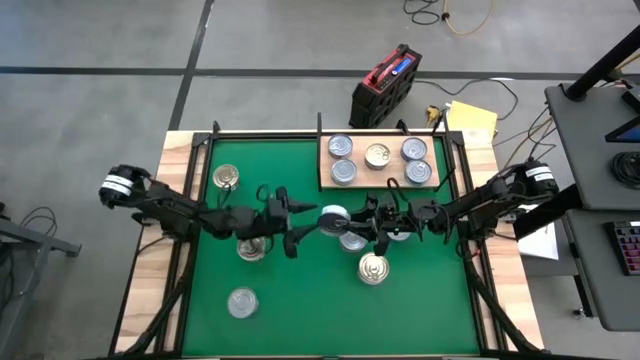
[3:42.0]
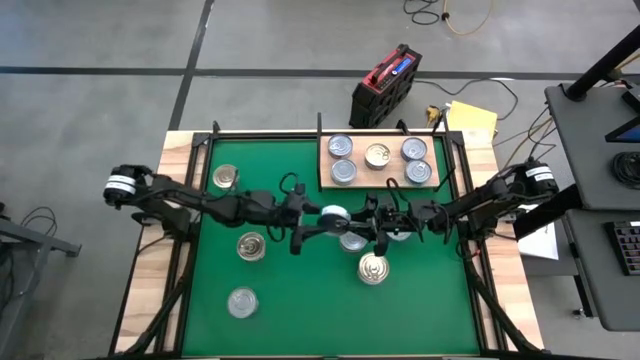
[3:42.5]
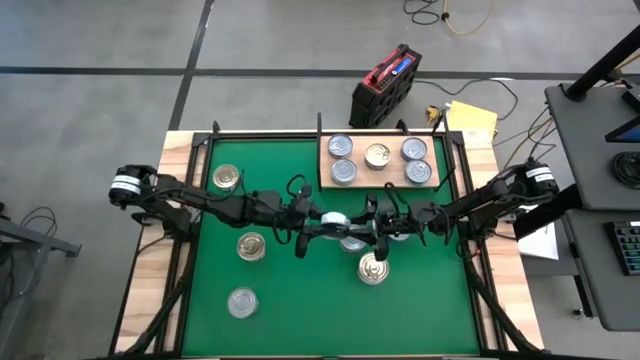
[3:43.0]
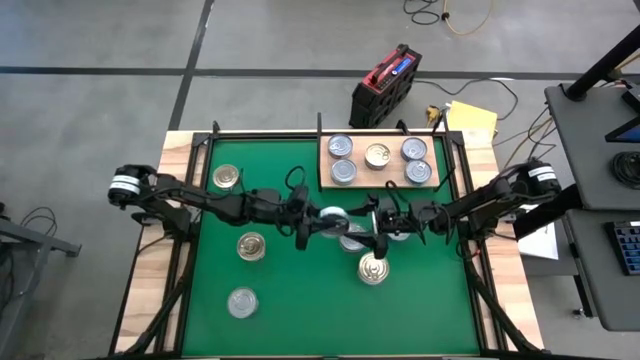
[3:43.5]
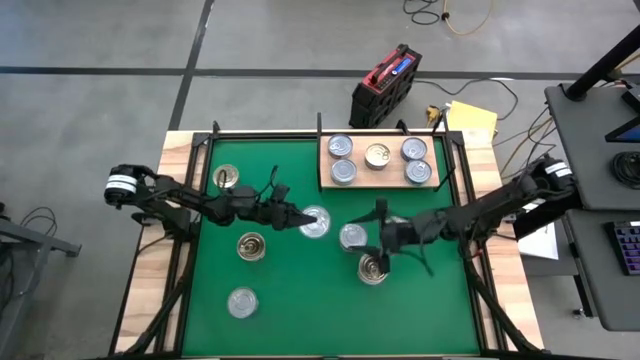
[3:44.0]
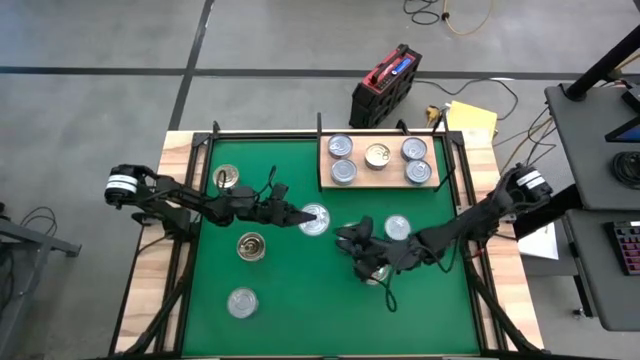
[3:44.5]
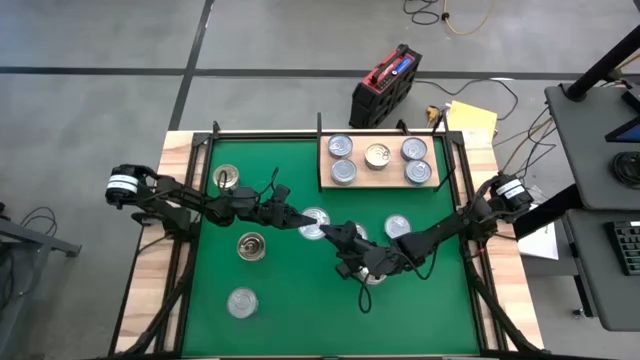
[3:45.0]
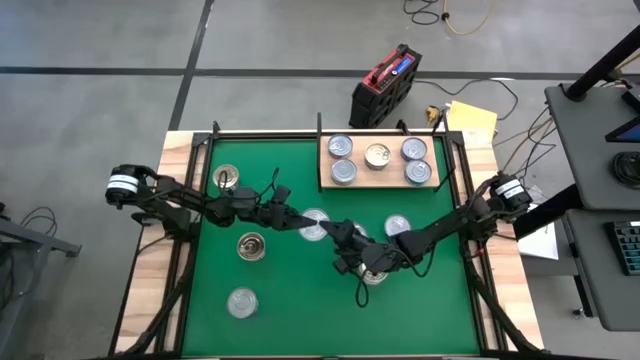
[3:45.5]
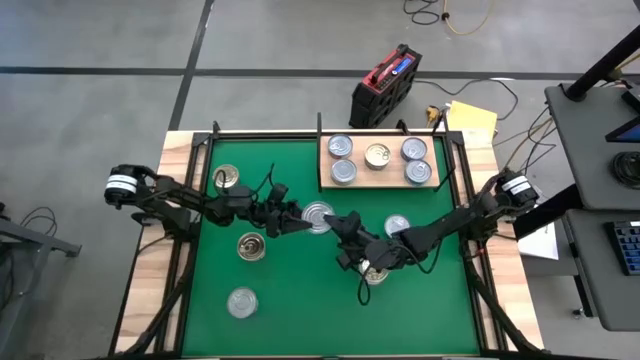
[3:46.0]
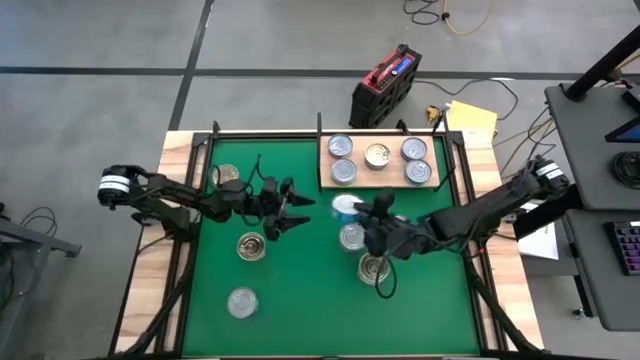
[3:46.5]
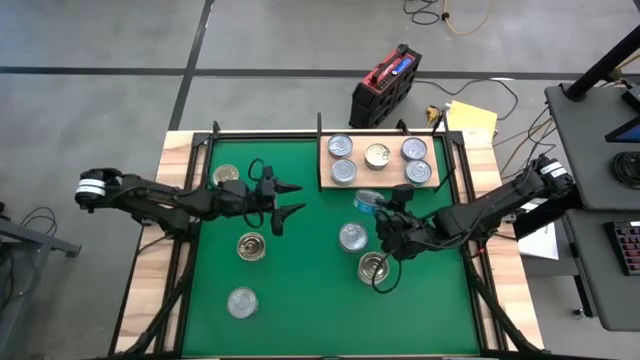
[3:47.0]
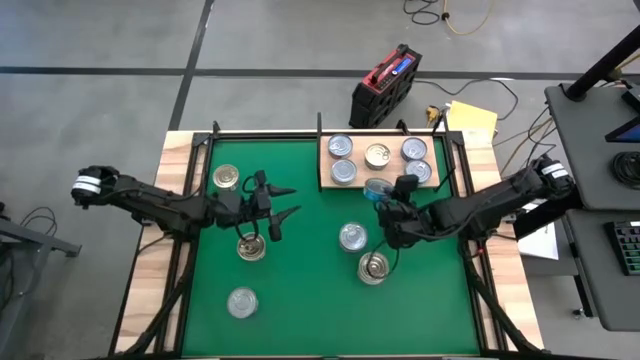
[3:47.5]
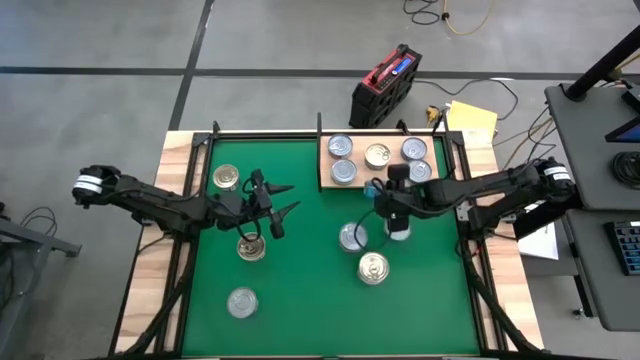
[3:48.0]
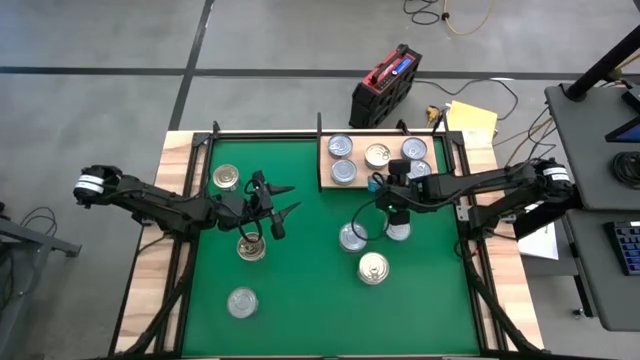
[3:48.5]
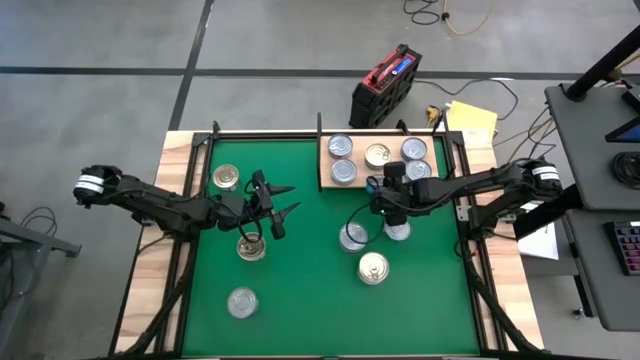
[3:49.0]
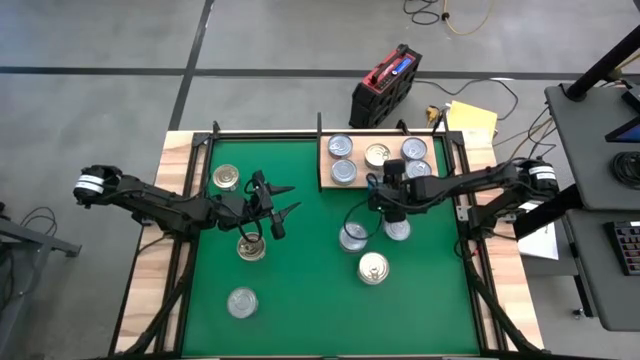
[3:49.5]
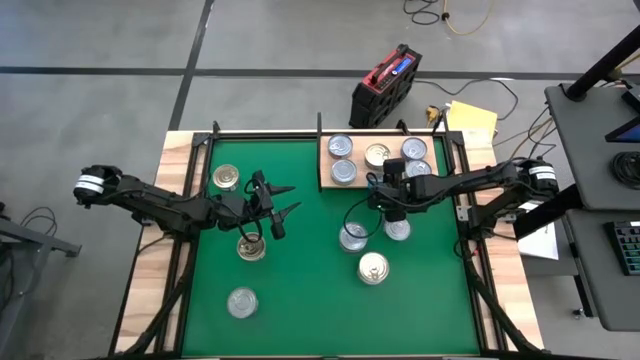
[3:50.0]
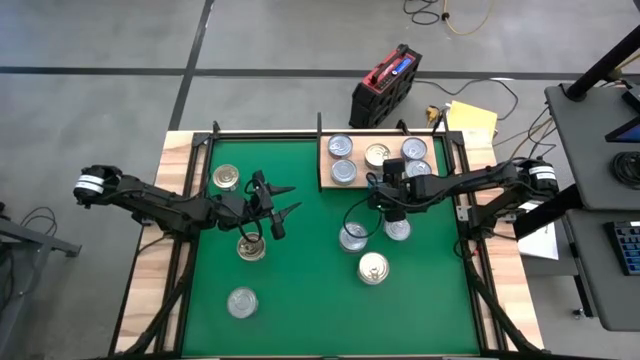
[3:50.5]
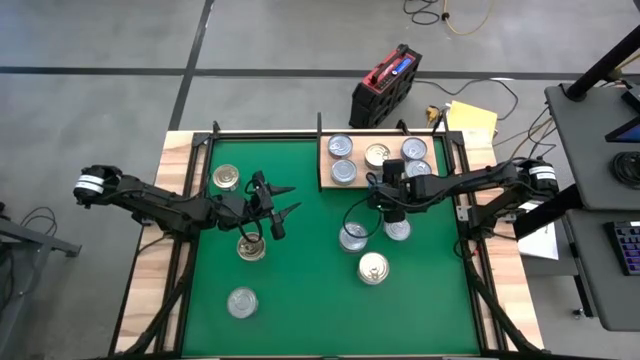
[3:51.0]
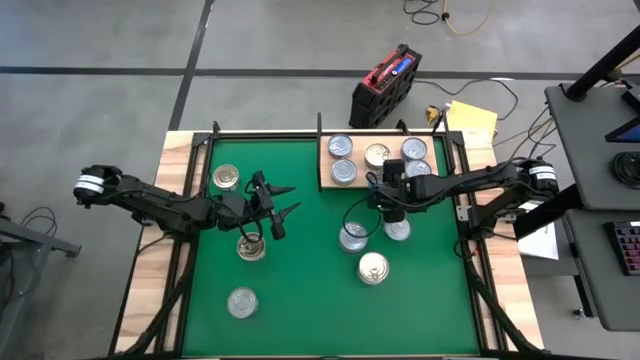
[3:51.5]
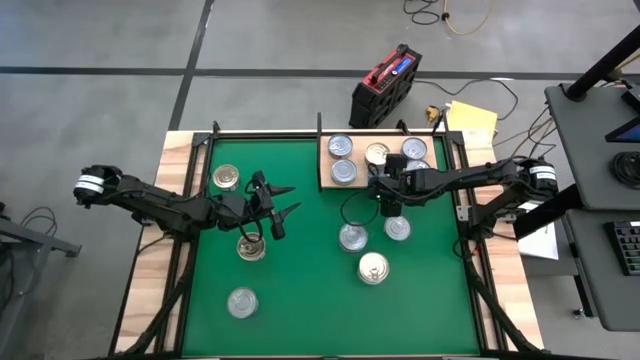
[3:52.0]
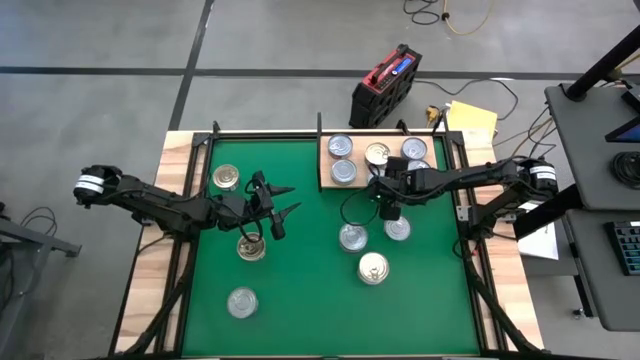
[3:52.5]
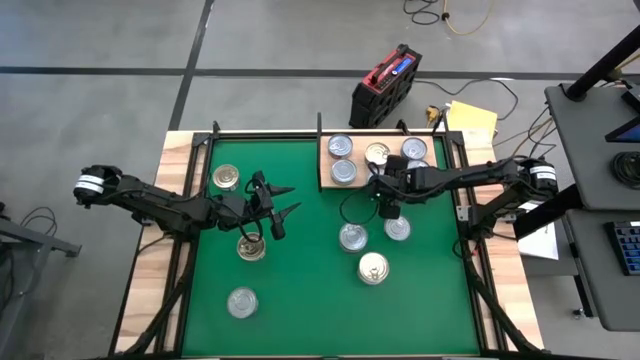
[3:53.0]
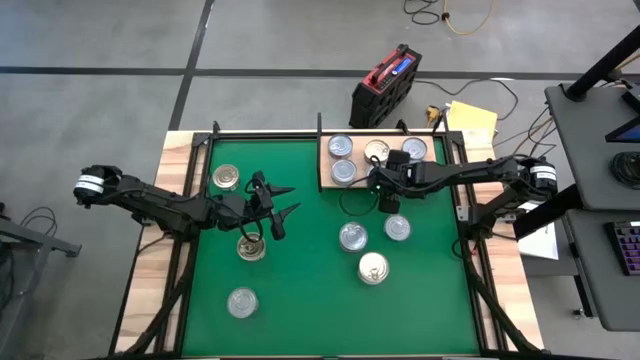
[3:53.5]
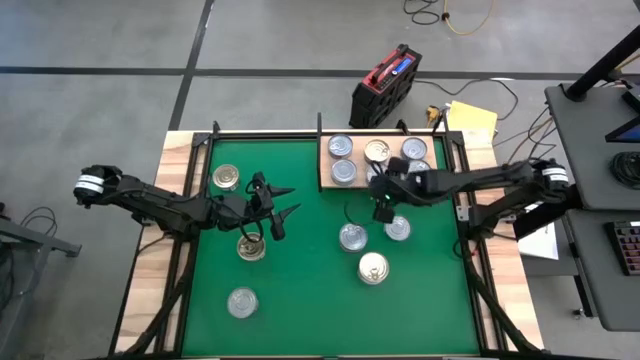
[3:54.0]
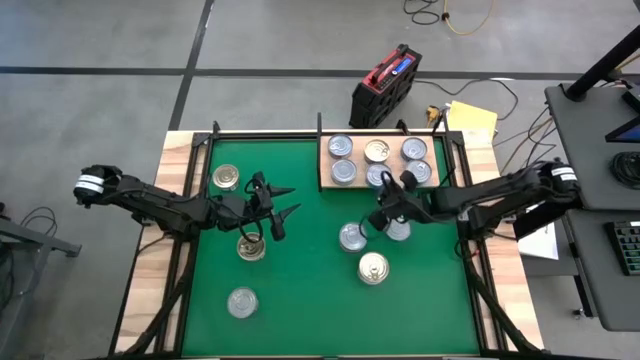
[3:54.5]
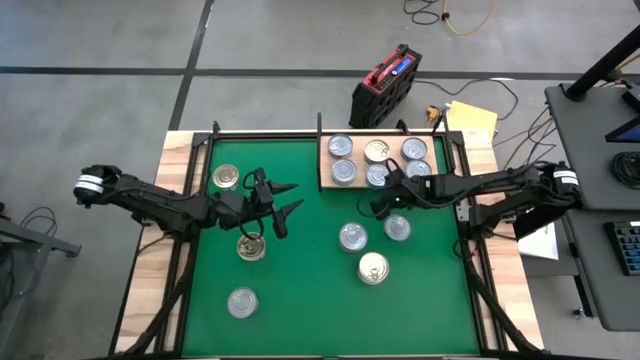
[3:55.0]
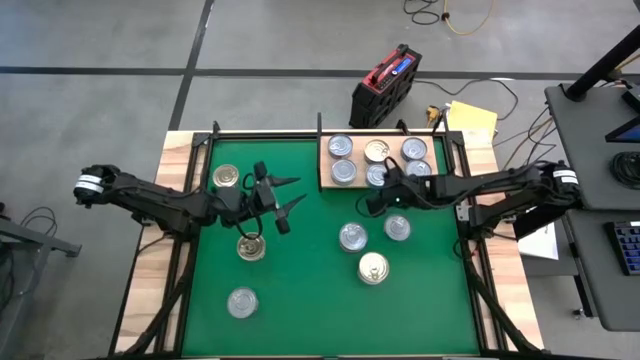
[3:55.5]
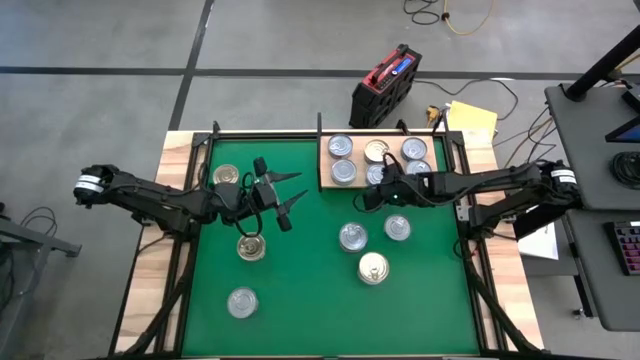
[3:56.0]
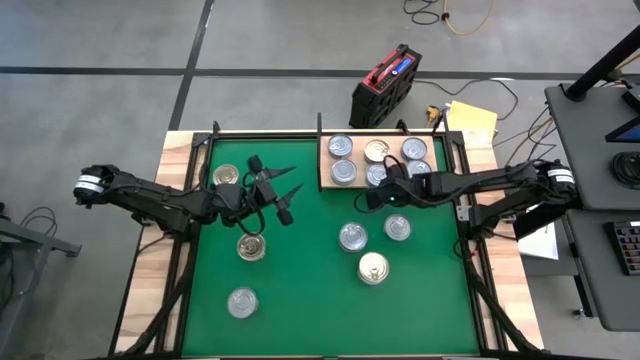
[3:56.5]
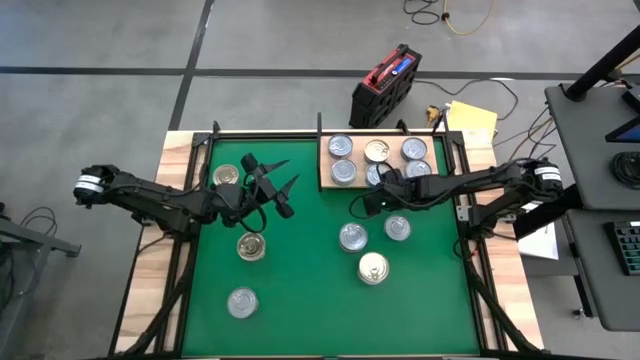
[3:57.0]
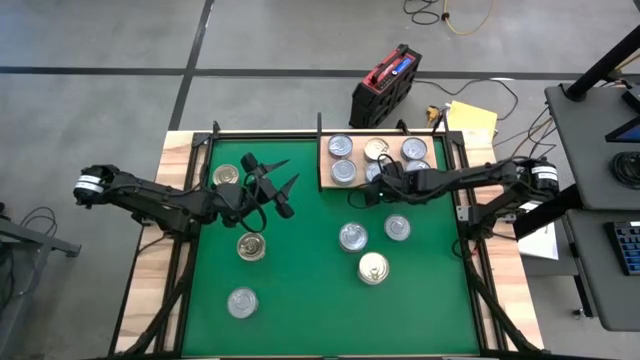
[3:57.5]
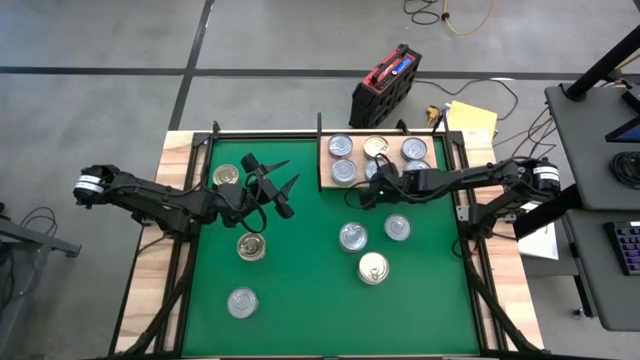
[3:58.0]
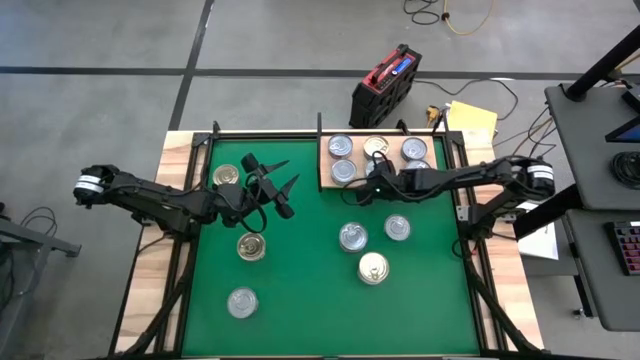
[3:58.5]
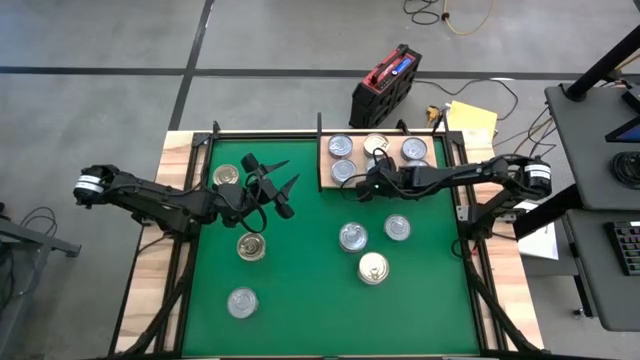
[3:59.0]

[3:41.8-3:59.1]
Task: Stack canned seafood by type on shelf
Put the green and blue tuna on the shelf

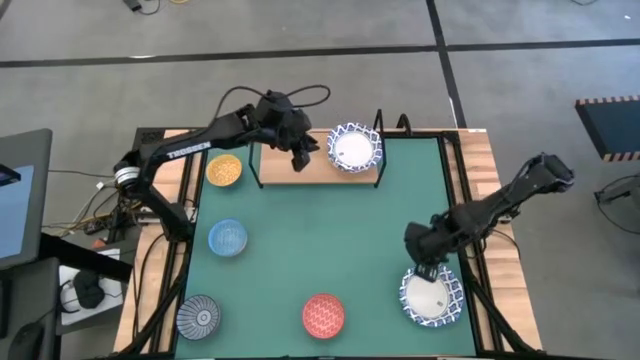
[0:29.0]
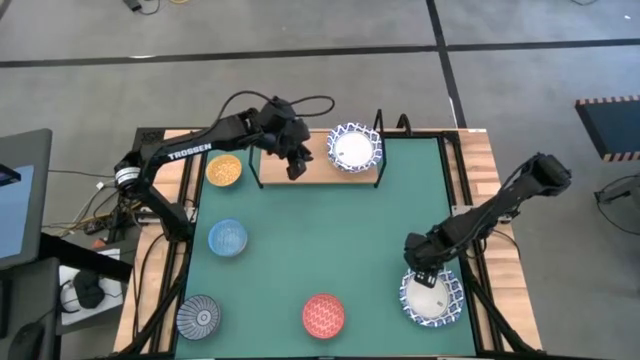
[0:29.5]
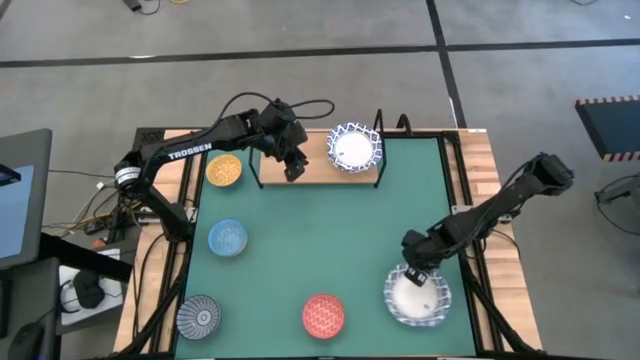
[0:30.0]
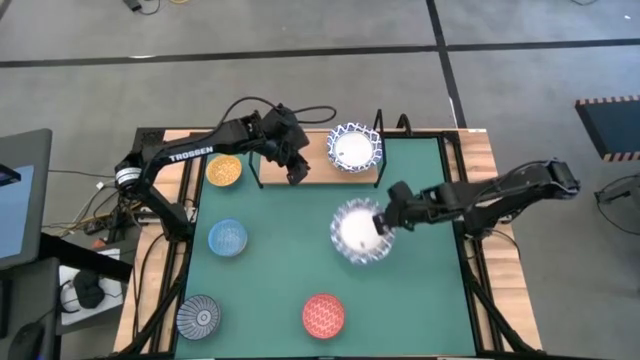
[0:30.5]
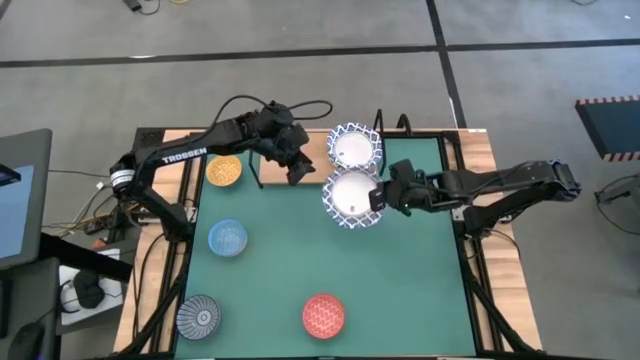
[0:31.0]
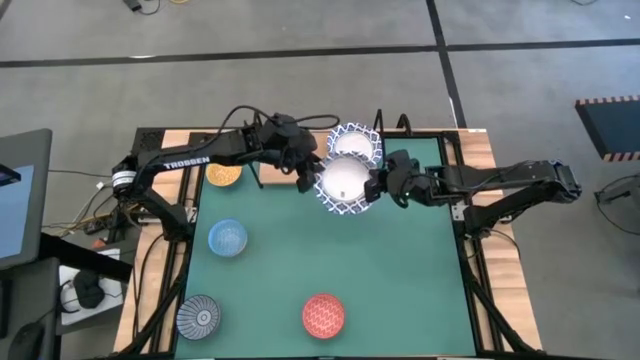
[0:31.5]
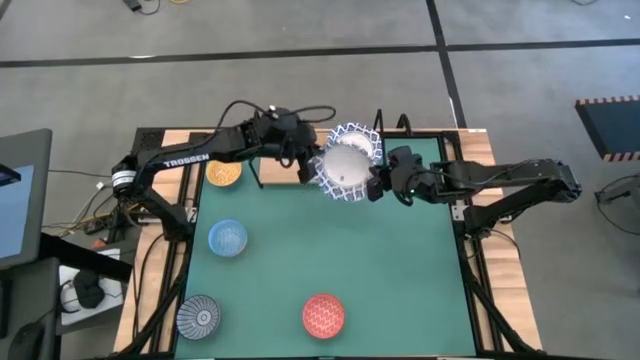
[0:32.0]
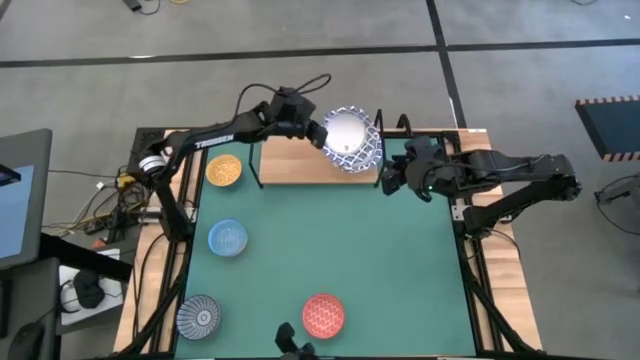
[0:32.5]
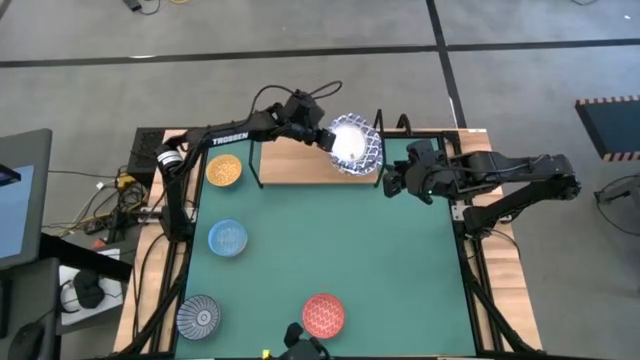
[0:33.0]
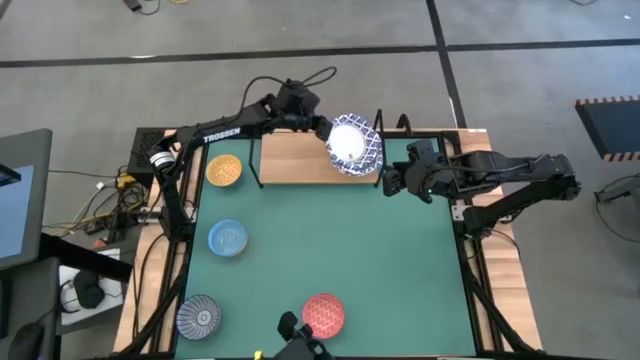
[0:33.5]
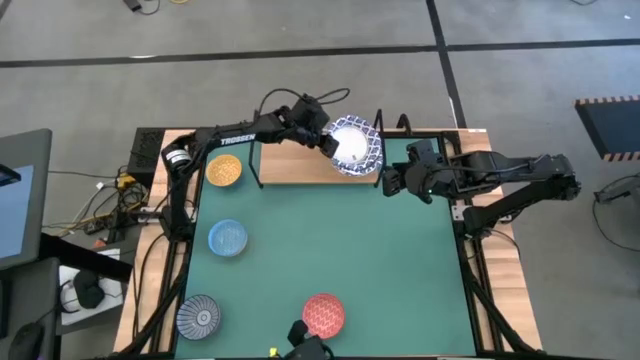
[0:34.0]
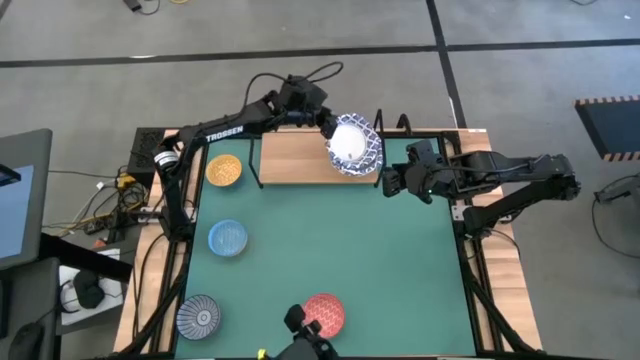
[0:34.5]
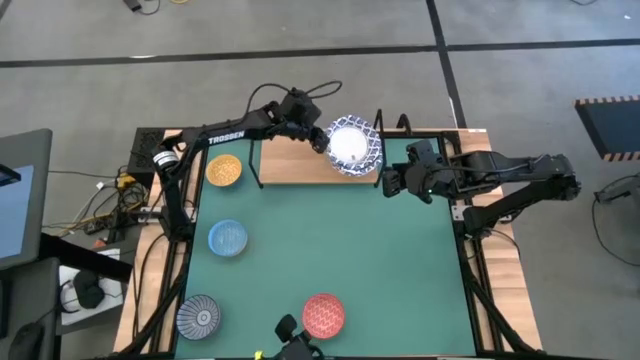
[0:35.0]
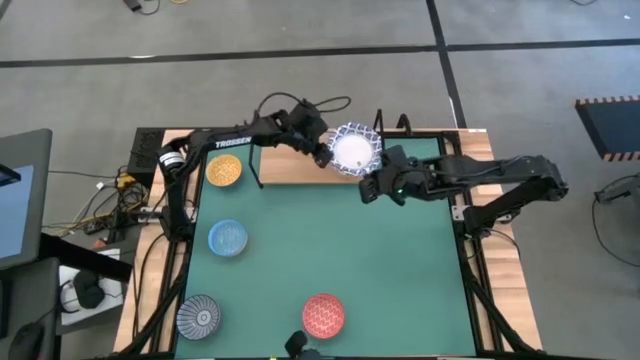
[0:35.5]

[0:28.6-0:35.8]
Task: Place and stack bowls onto a shelf
Stack the white bowl on top of the other white bowl on the shelf
